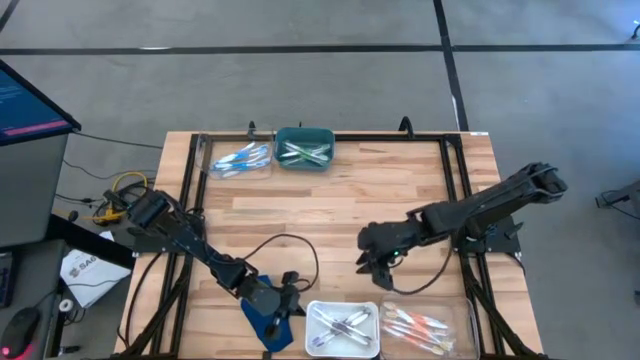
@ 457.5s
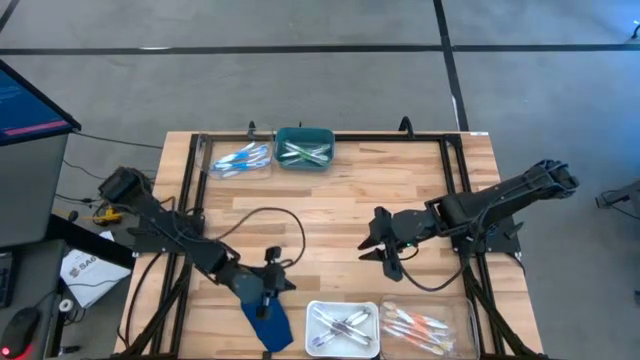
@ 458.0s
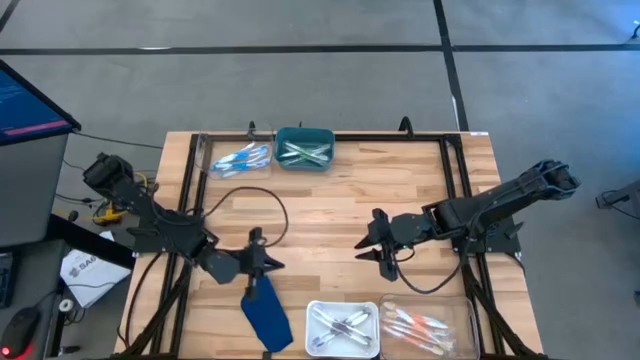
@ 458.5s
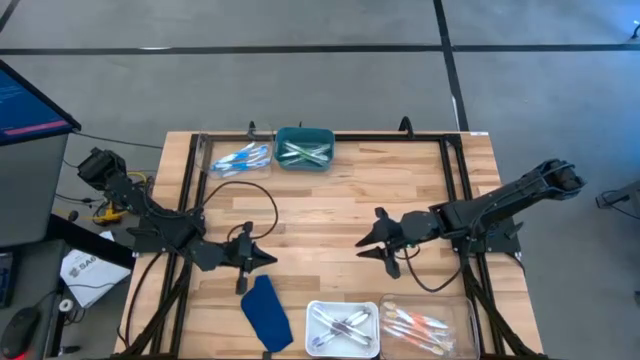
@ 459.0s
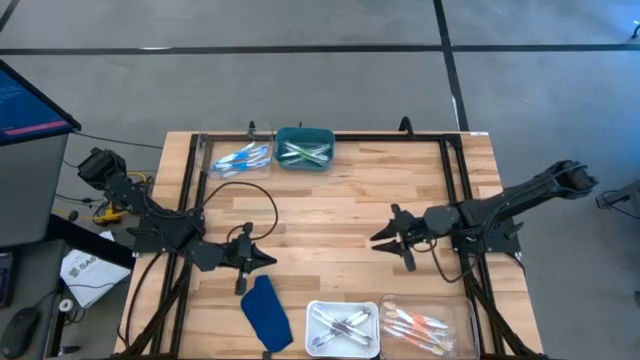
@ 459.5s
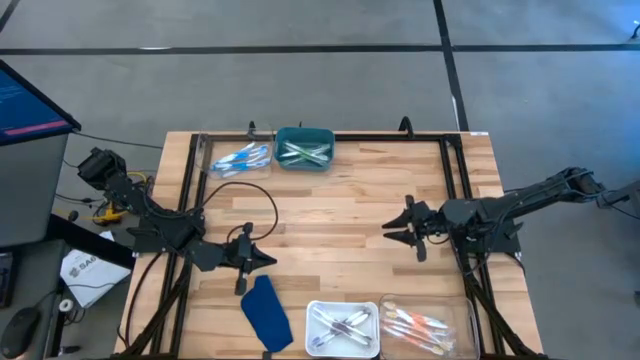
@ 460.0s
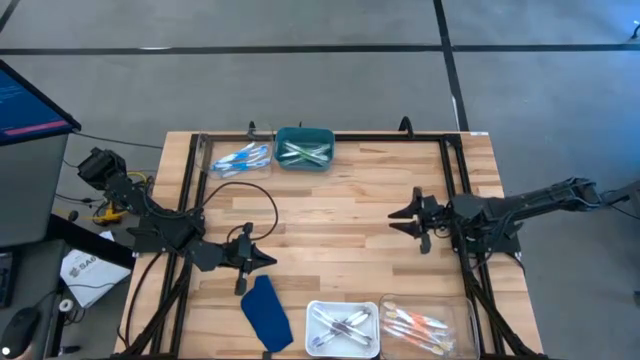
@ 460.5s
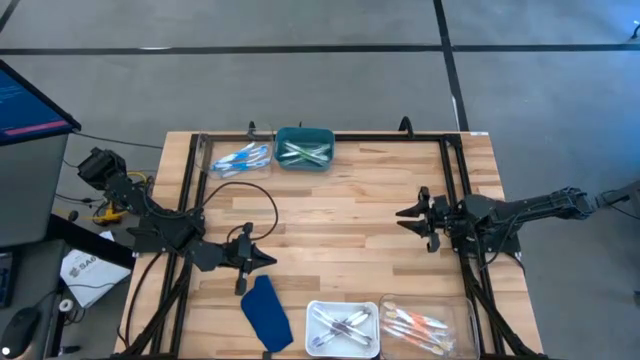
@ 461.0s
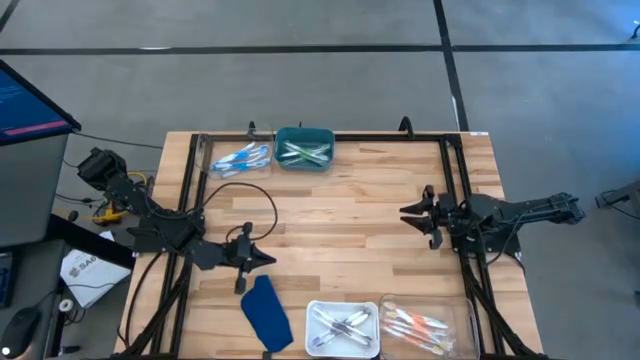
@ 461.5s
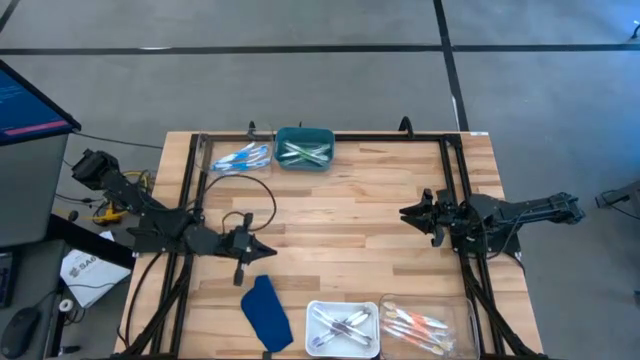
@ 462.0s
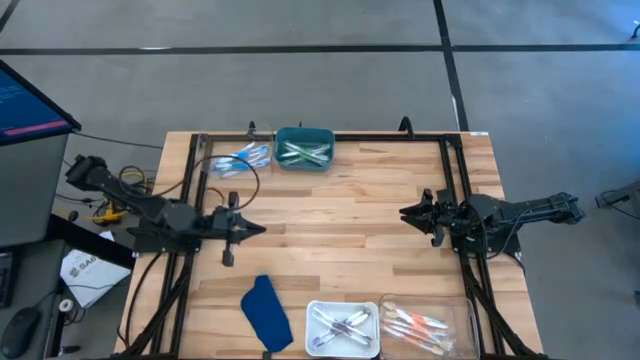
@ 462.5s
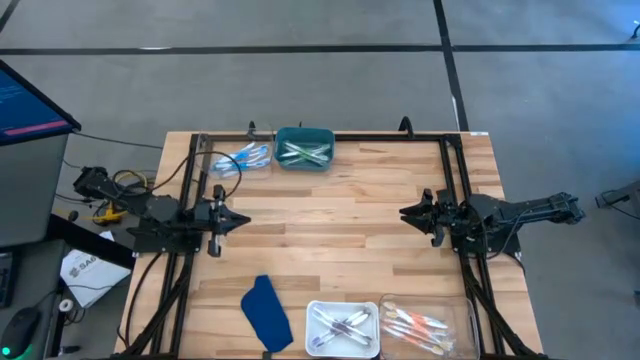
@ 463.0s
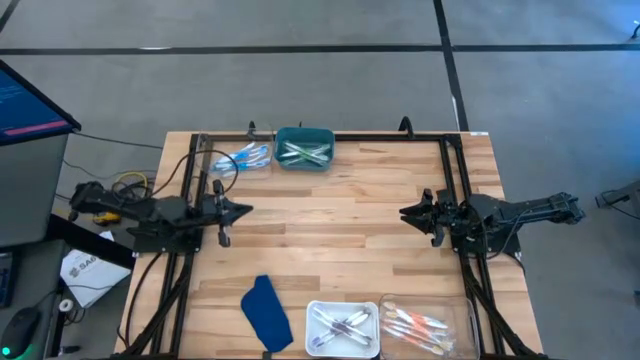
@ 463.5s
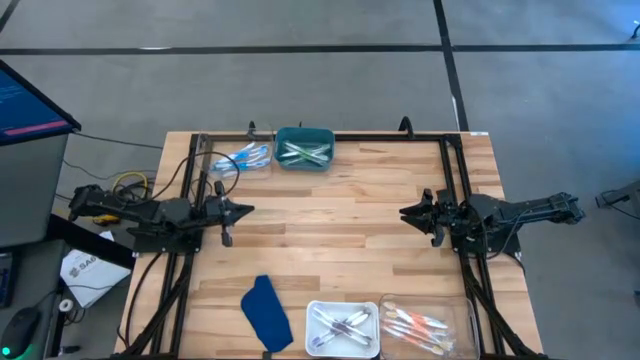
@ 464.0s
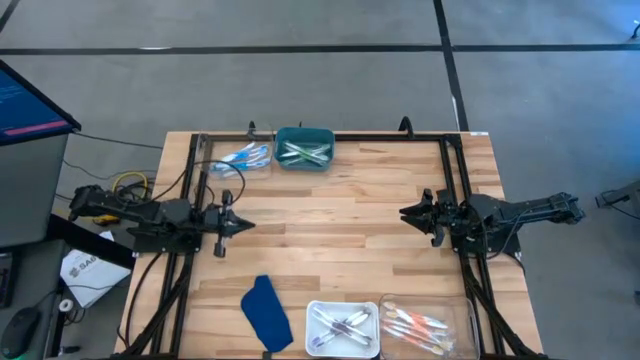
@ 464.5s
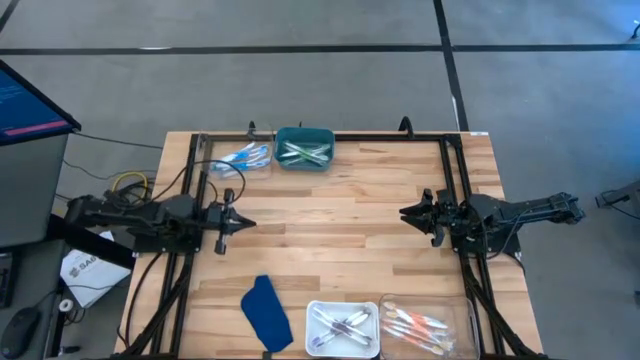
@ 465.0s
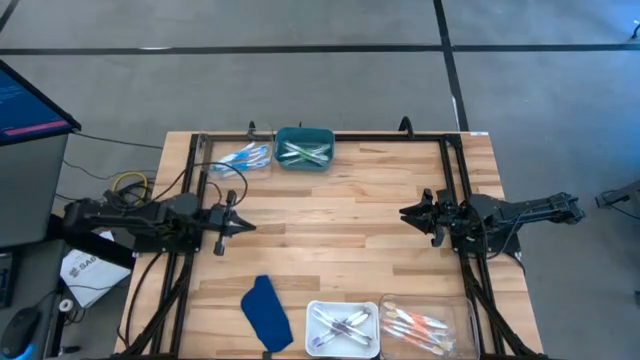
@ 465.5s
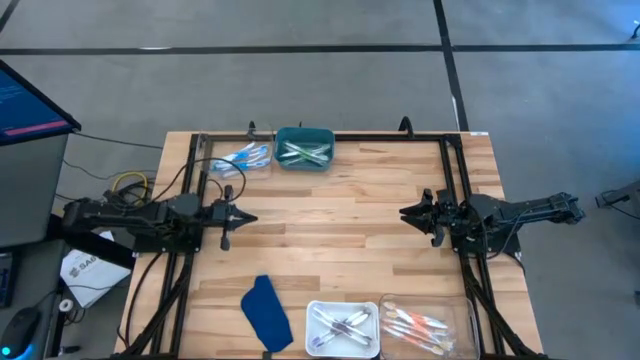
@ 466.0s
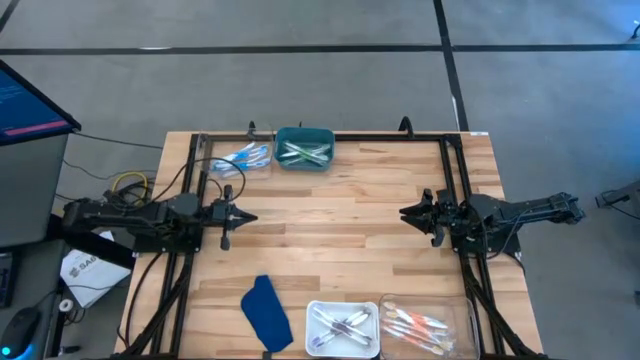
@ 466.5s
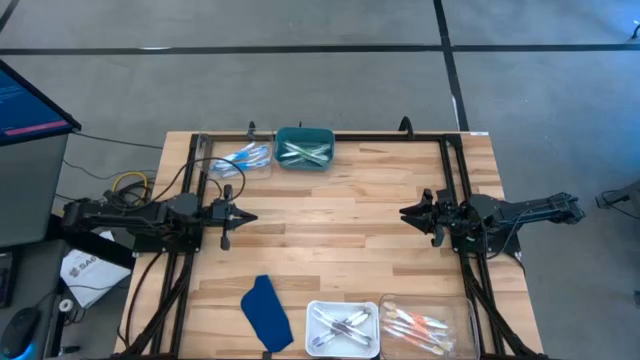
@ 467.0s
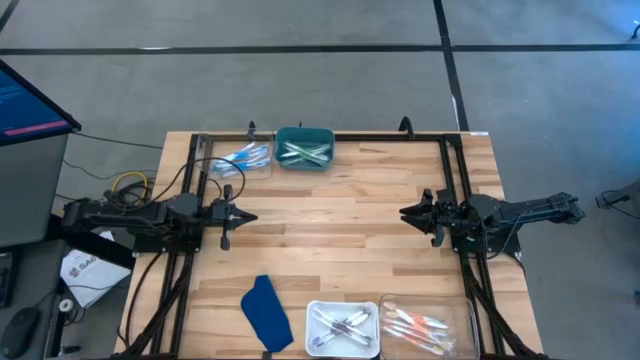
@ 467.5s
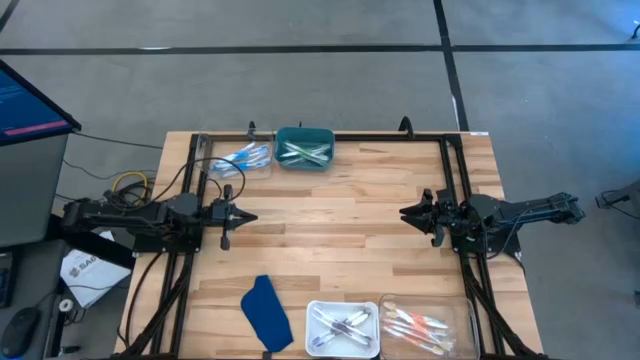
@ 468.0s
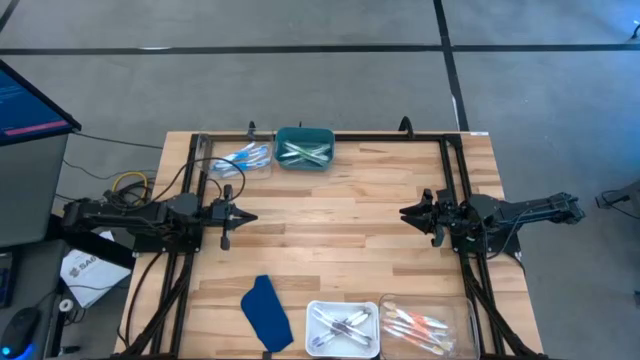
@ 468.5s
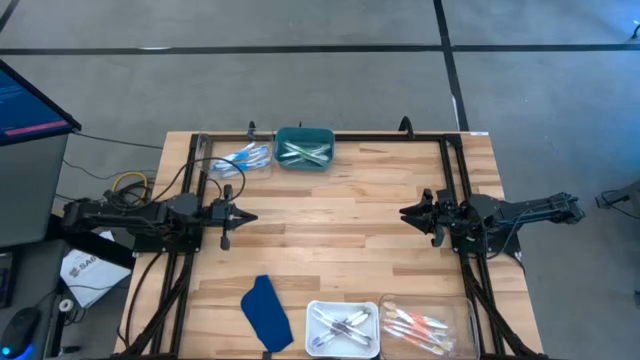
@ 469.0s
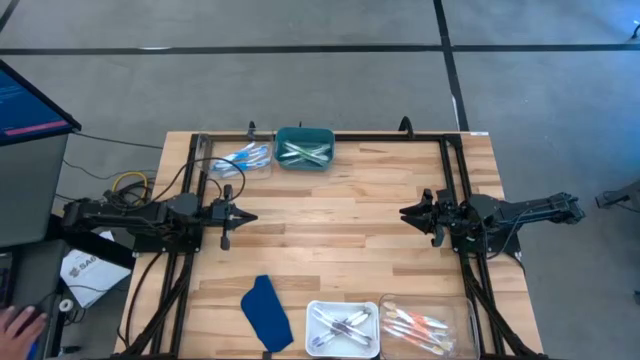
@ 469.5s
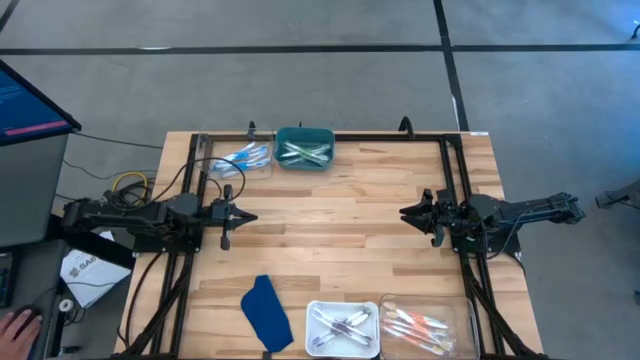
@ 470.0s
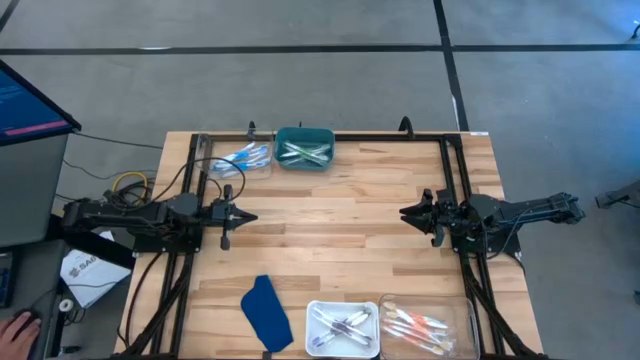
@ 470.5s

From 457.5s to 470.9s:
Task: Pick & Place Toothbrushes
Return to Home Position

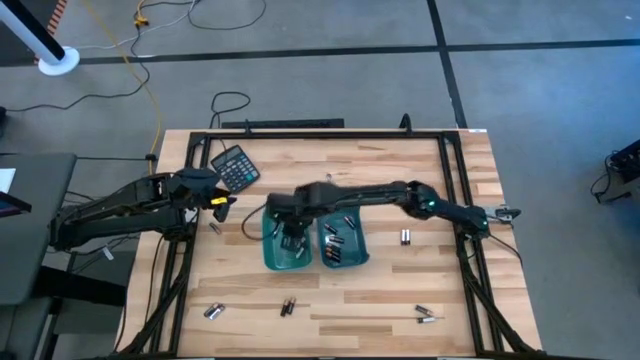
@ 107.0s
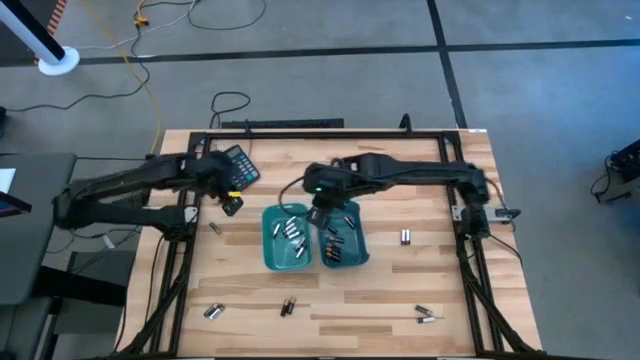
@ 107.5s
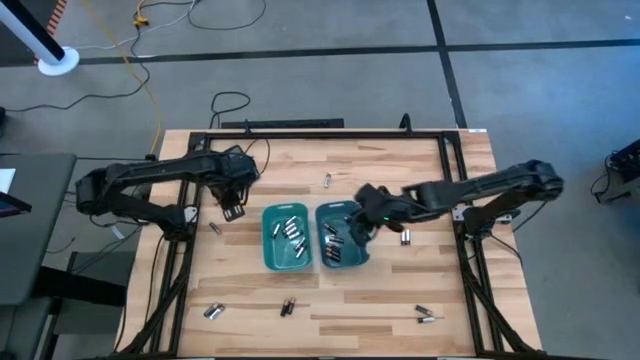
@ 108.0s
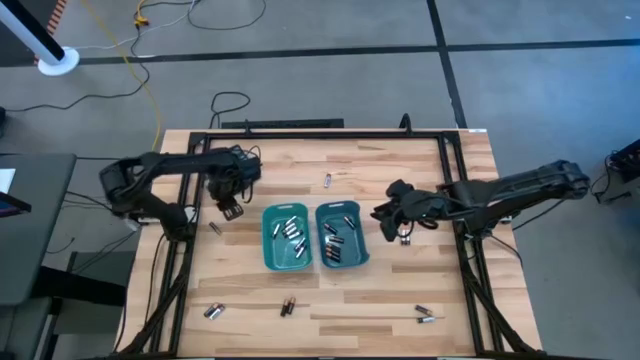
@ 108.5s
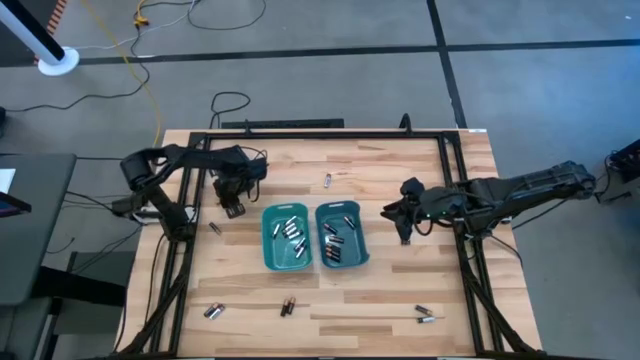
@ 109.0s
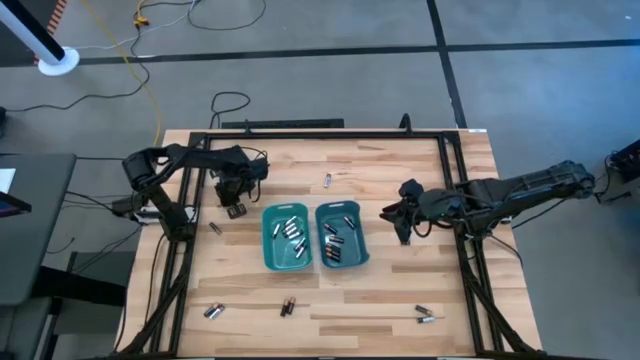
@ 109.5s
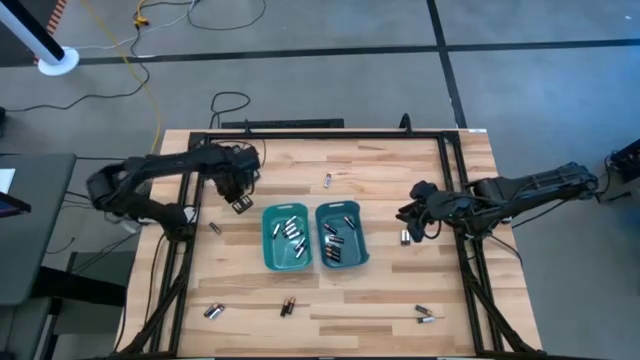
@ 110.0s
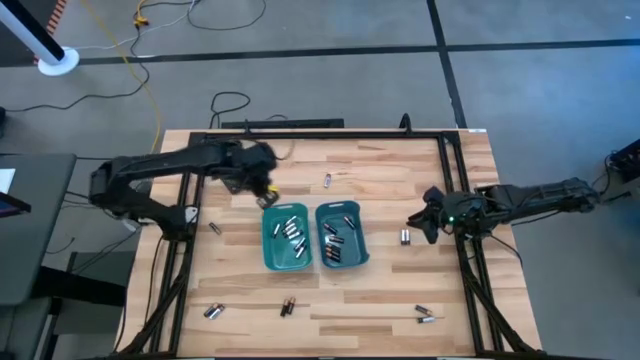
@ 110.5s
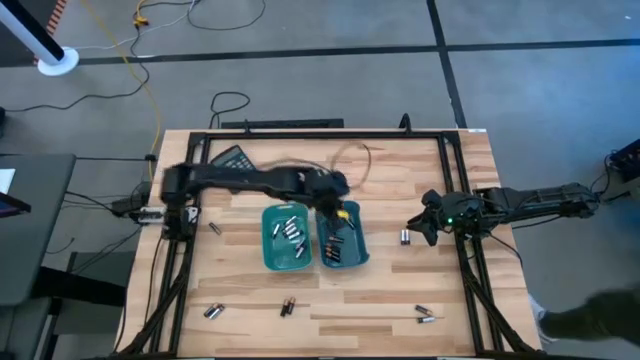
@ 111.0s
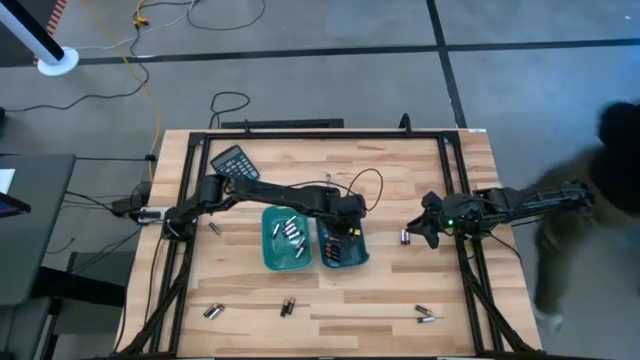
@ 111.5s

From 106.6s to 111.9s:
Task: Sort batteries
Put the black battery into the blue bin

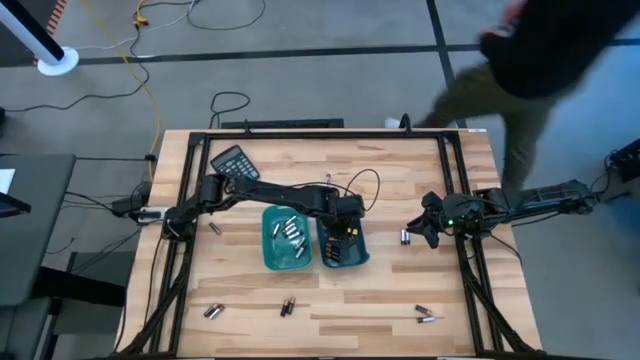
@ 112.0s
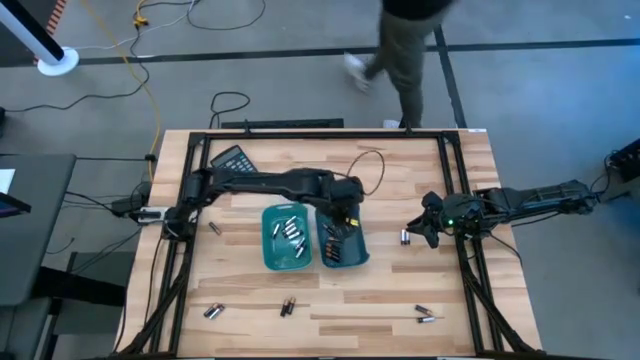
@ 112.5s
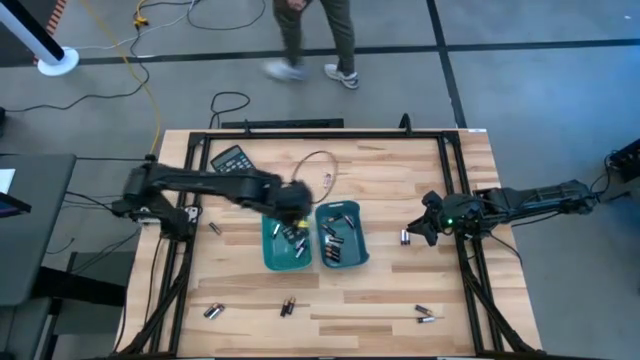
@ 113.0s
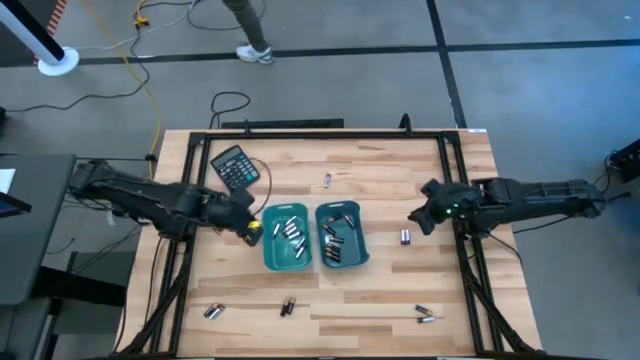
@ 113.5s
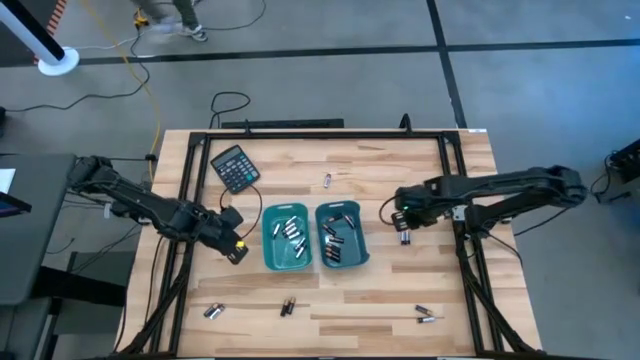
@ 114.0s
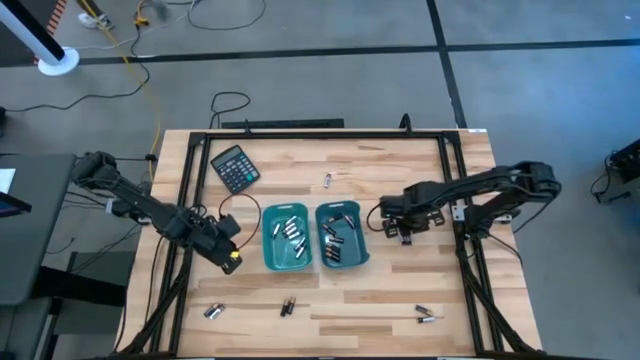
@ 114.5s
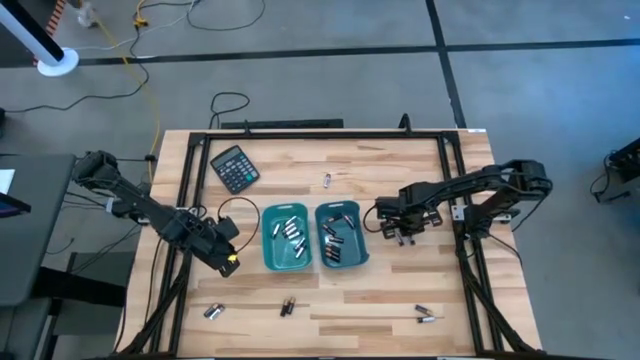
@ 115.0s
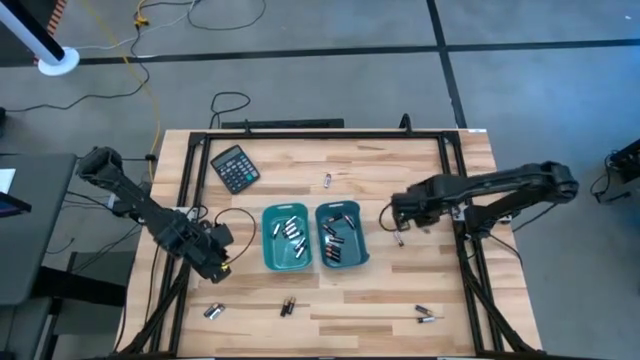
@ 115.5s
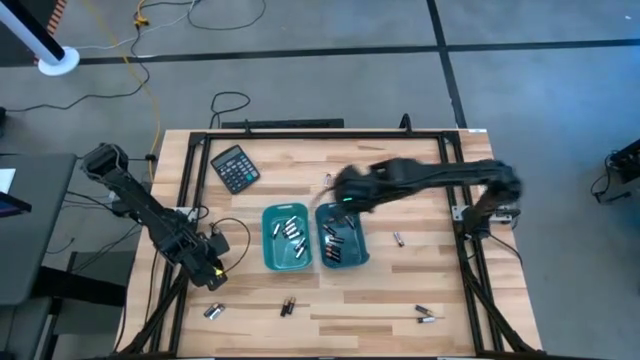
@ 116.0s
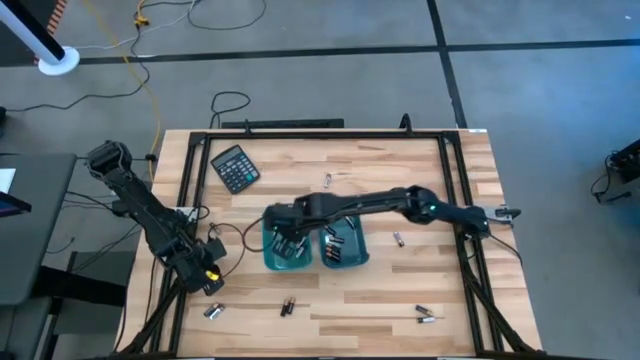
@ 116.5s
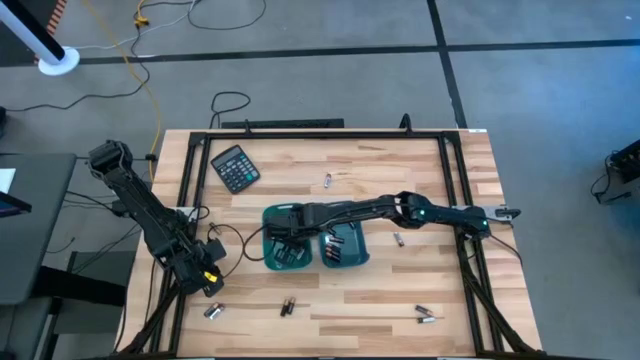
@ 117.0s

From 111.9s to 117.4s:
Put the silver battery into the green bin
